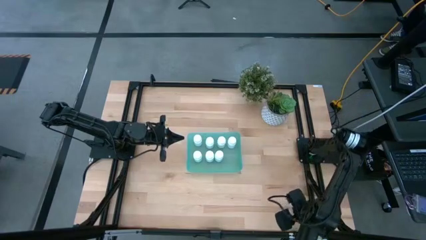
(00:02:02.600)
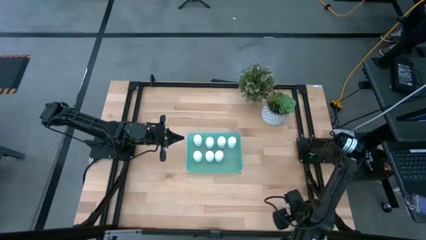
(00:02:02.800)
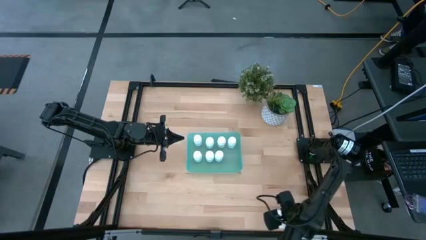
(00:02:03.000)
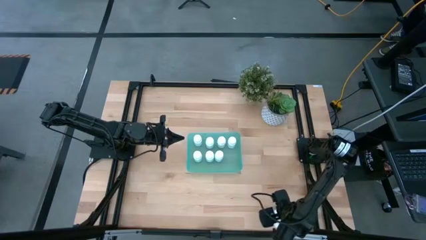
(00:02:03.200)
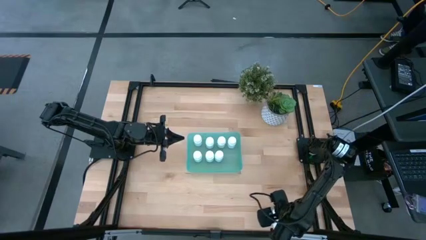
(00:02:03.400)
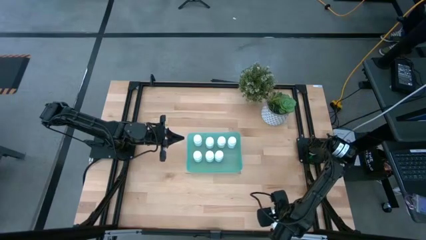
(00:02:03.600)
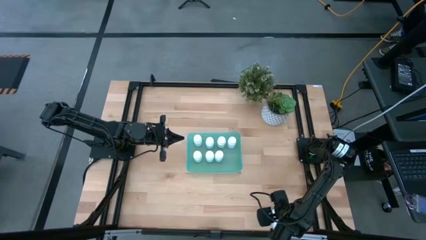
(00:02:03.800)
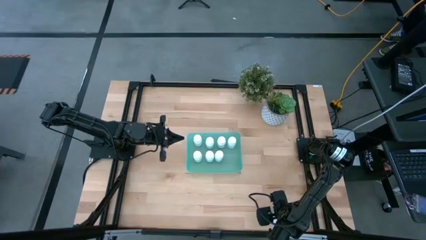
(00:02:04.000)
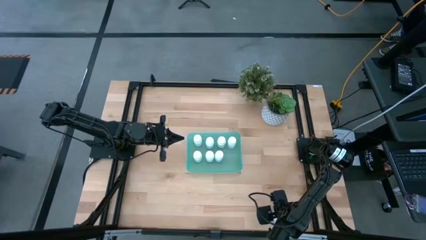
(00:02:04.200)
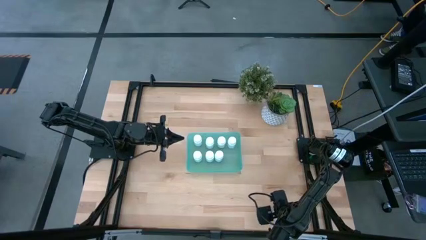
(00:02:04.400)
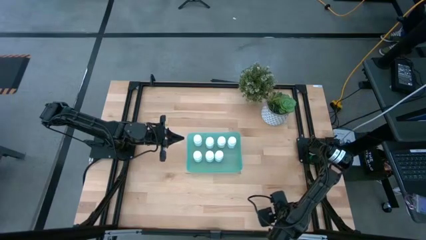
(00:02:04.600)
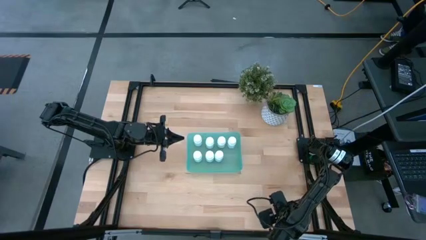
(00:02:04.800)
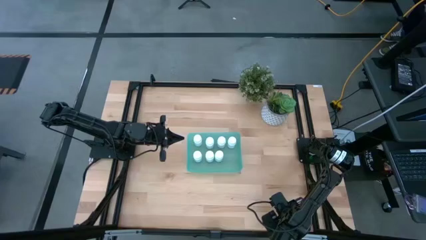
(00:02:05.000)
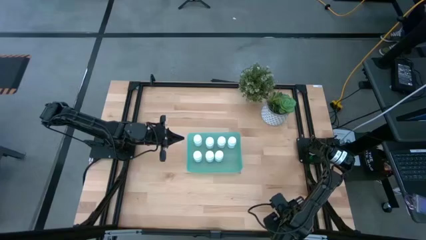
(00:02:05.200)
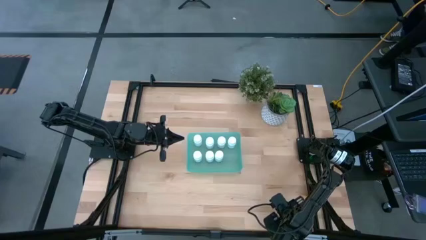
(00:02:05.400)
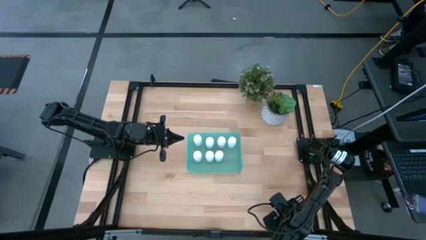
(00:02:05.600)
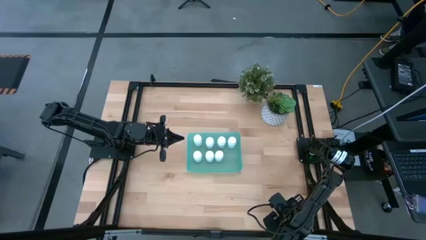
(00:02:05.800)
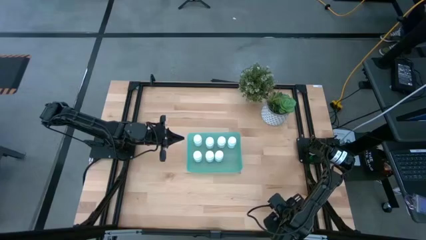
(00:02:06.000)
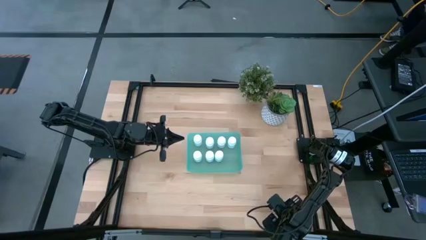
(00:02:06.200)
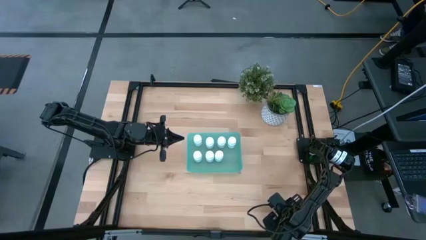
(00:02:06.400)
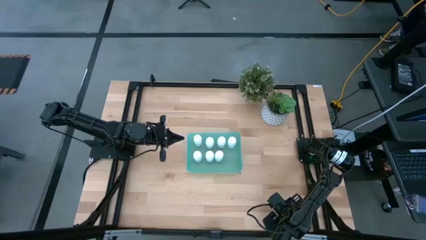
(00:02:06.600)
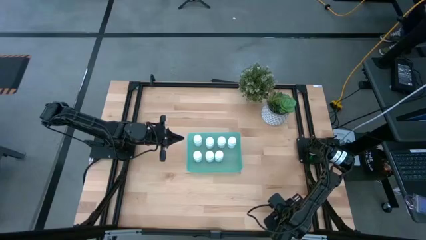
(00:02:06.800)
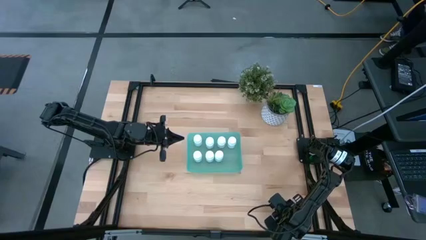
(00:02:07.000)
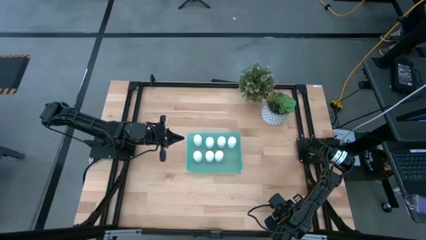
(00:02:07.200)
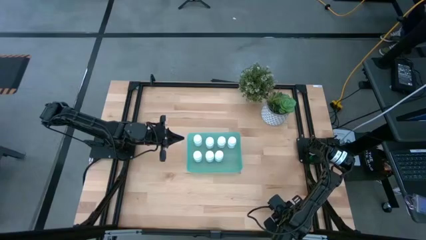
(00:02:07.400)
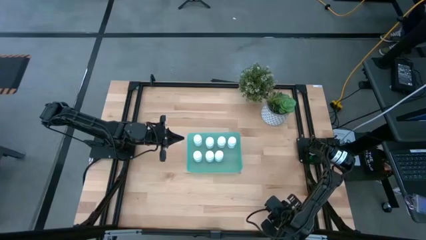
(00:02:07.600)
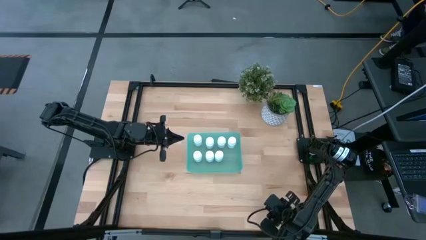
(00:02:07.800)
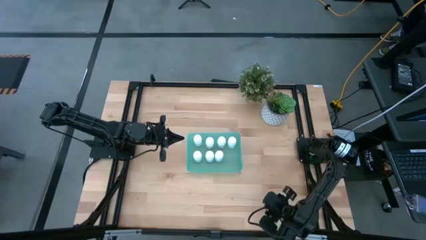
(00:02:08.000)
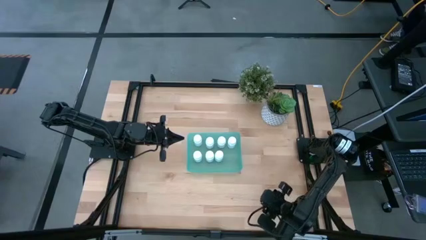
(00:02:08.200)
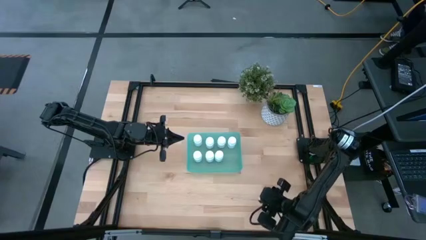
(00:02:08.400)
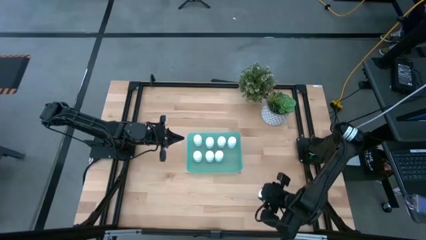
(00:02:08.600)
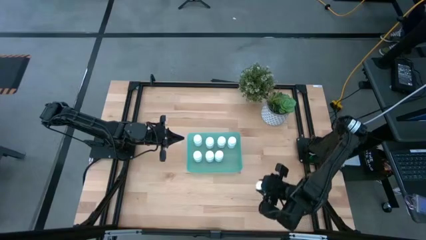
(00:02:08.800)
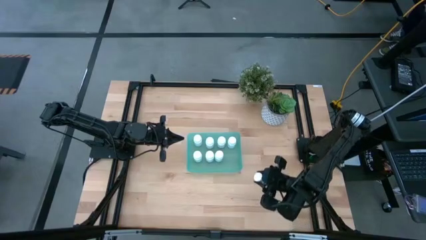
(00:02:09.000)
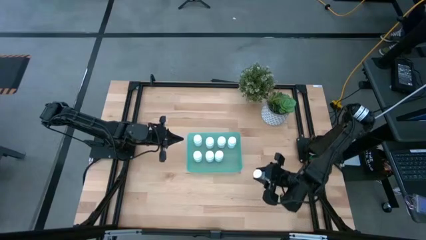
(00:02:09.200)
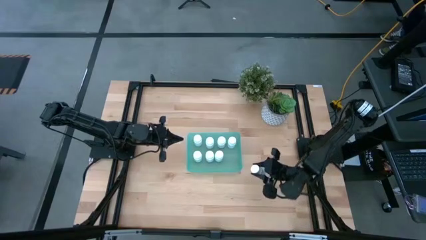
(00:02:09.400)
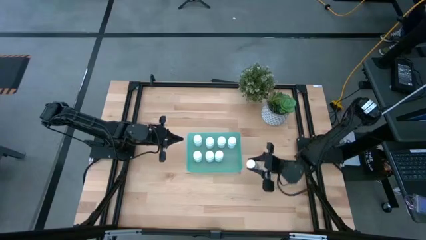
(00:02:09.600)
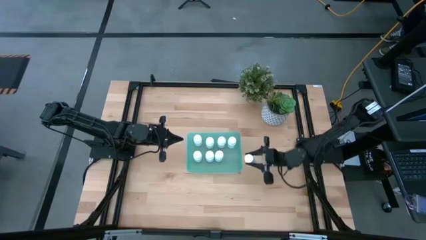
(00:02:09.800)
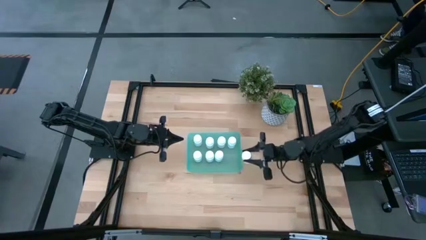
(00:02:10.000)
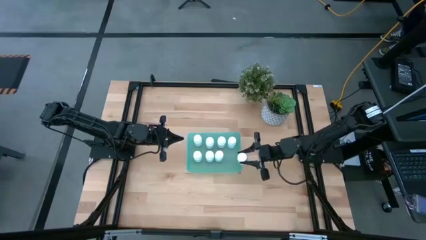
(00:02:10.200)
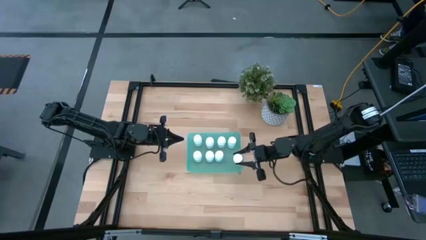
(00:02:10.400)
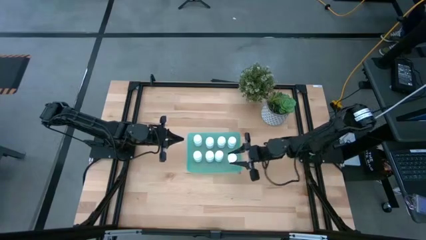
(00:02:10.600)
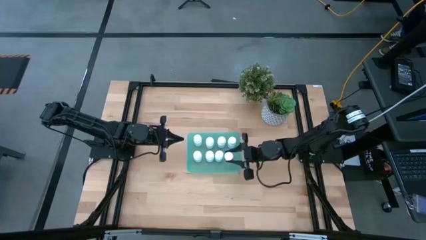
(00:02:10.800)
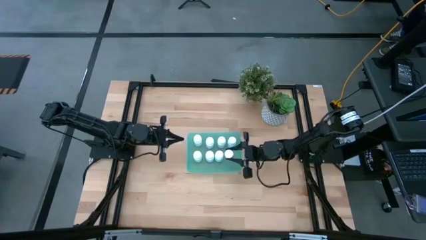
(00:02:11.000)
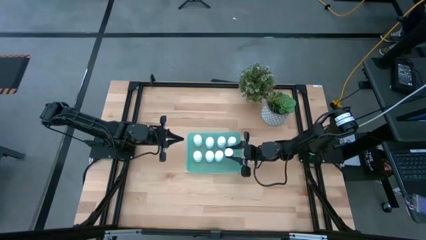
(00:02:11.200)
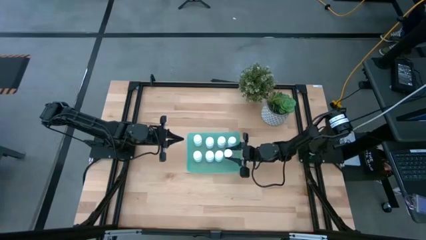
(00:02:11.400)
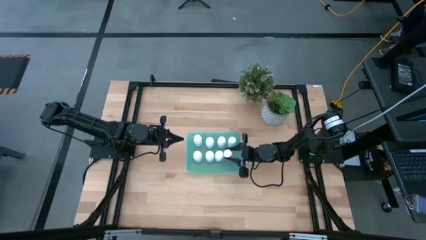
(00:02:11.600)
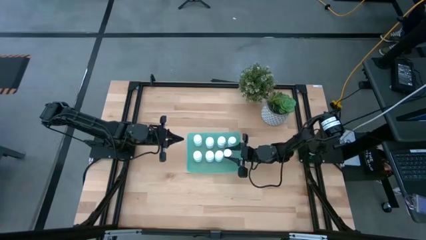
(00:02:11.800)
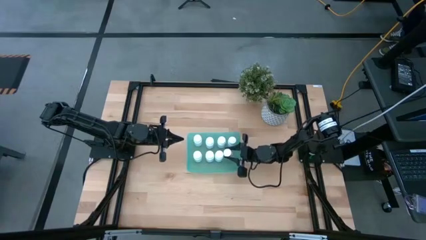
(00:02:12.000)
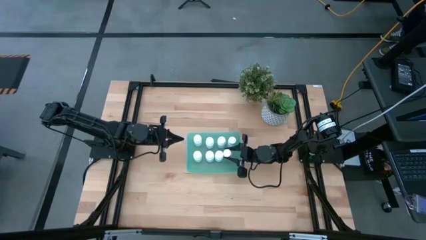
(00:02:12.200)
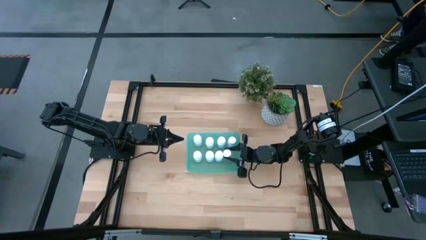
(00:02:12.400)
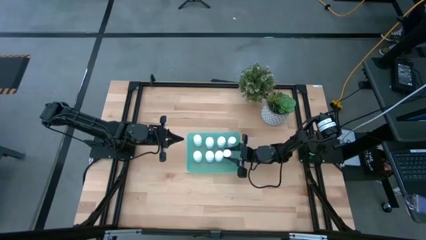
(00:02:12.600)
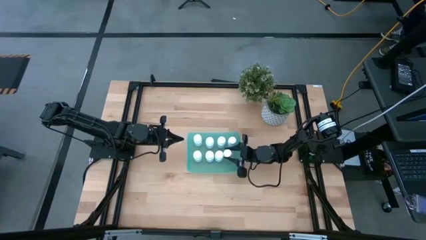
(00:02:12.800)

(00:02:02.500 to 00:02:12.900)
Task: Pick and place pill bottles into a basket
Put the white pill bottle into the blue bin

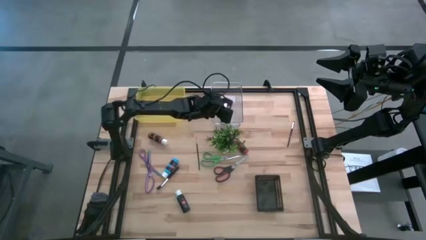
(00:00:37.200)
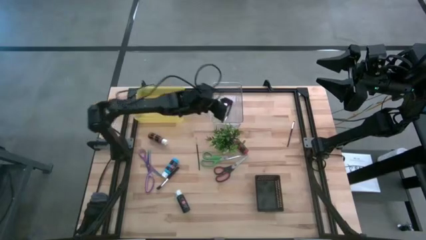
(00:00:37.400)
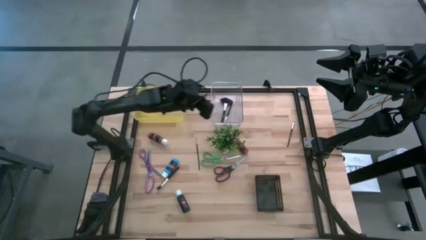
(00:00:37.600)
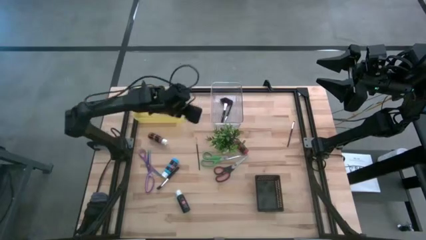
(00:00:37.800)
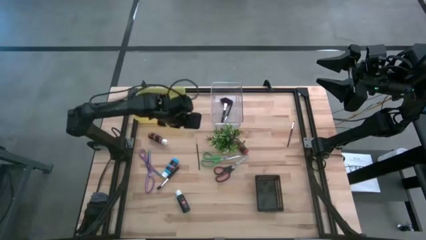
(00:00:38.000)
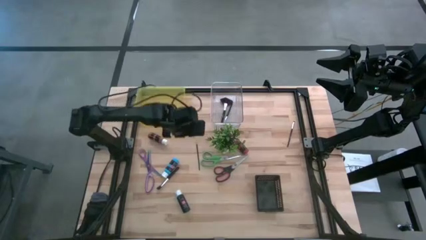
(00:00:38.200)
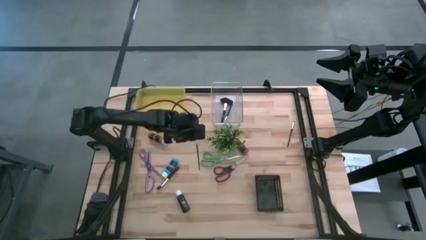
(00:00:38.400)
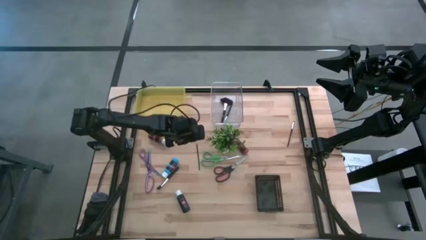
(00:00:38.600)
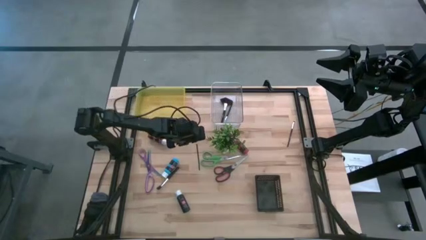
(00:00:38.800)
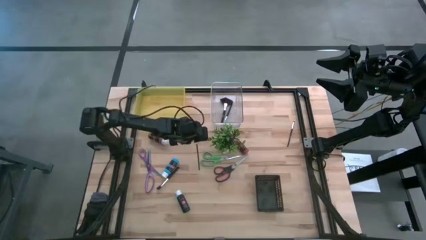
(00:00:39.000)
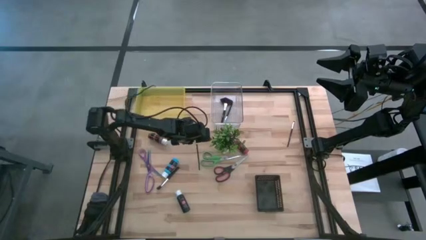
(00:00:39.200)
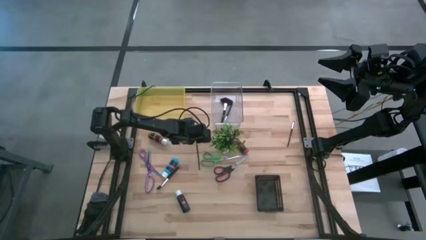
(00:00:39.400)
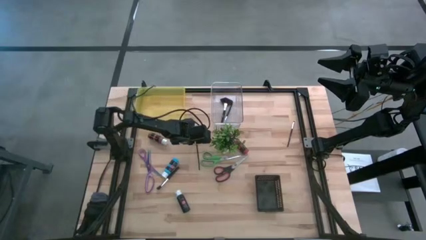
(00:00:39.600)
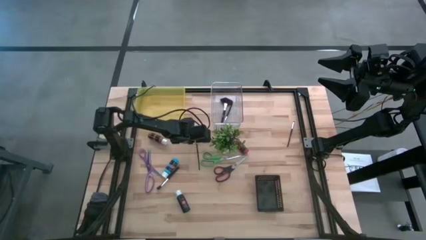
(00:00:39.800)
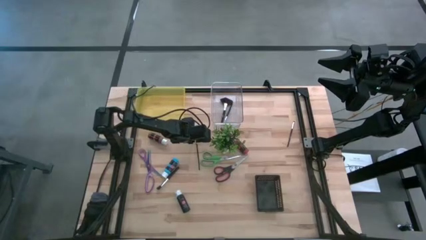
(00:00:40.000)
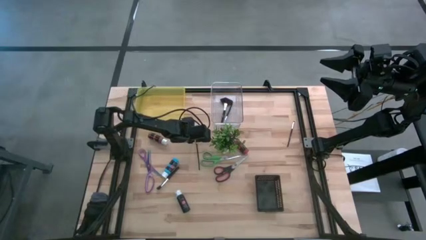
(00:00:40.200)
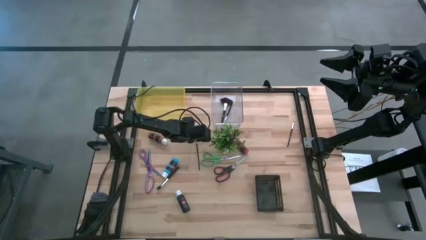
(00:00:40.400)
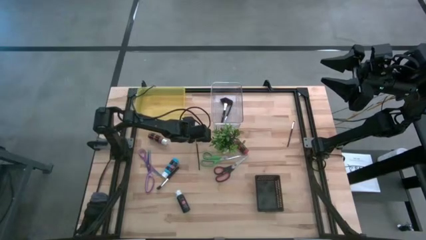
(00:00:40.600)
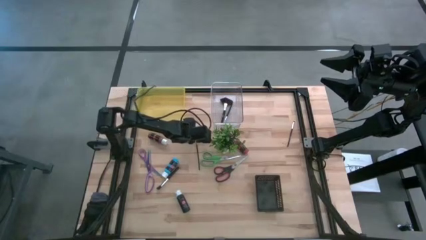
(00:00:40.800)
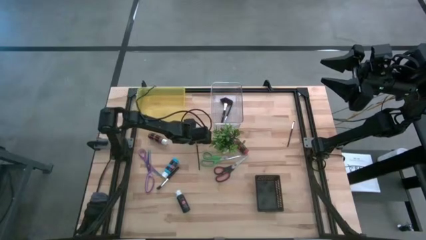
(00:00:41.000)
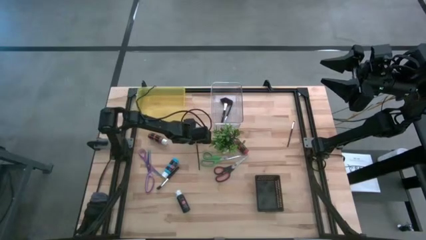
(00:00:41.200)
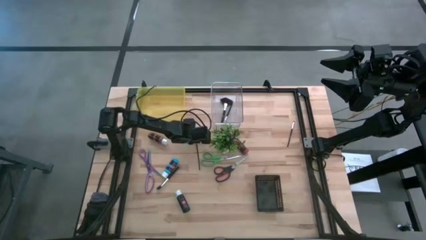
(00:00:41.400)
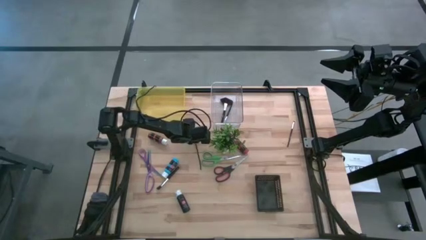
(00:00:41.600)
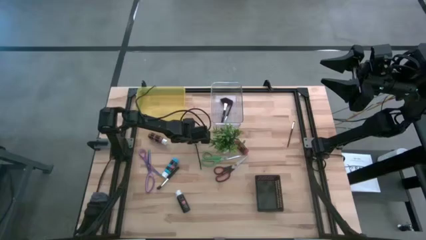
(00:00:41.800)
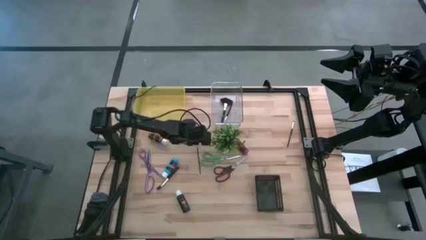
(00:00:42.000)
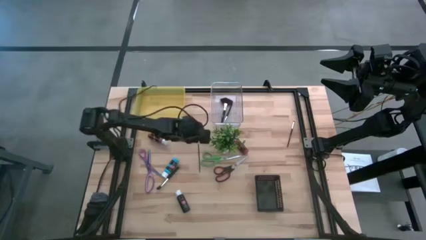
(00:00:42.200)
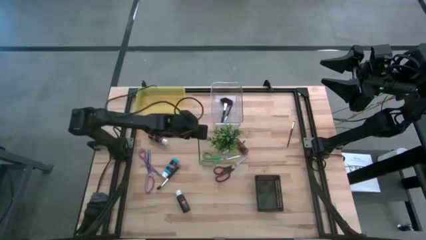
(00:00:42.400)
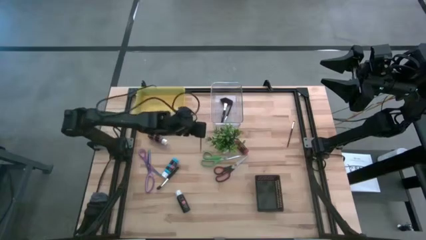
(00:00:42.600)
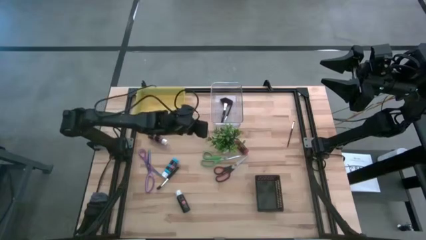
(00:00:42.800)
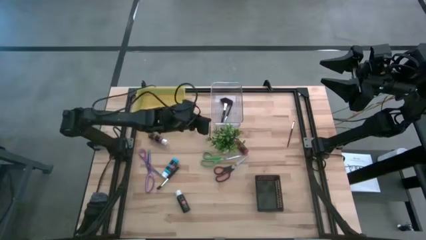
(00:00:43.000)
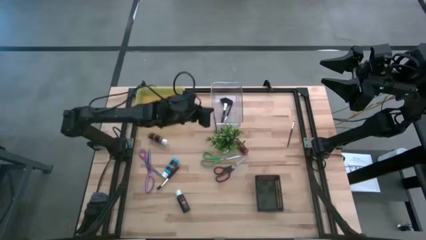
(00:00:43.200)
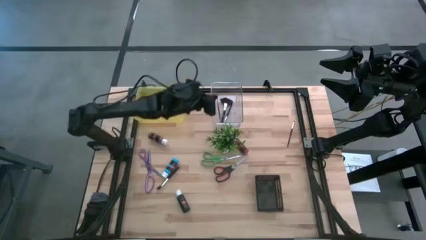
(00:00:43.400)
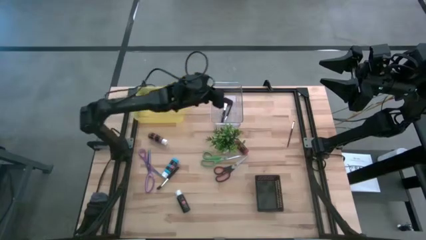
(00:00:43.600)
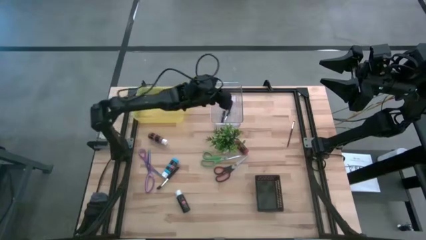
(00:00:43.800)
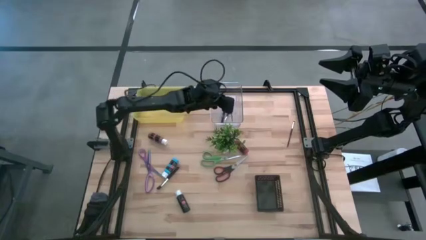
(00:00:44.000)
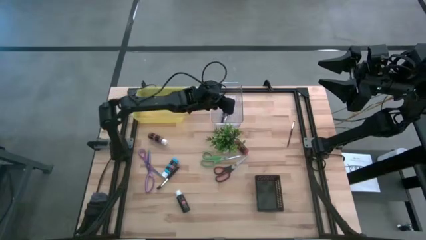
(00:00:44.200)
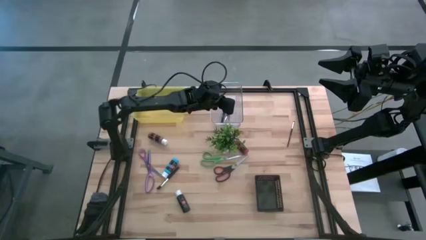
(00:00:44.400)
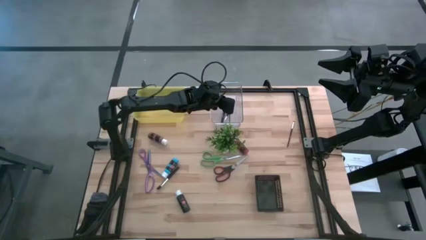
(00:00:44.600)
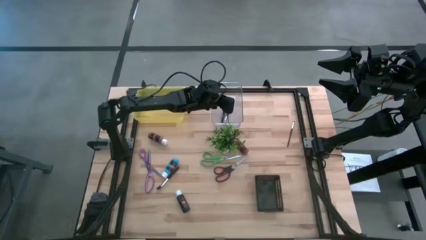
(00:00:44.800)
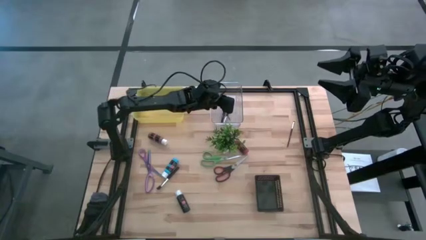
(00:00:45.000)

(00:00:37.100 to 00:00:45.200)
Task: Pick & Place Paint Supplies
Put the paint brush into the transparent bin
